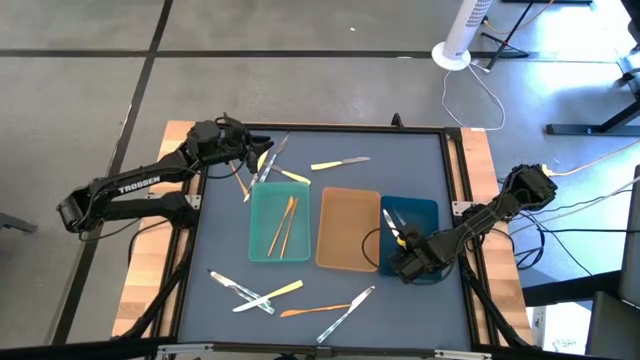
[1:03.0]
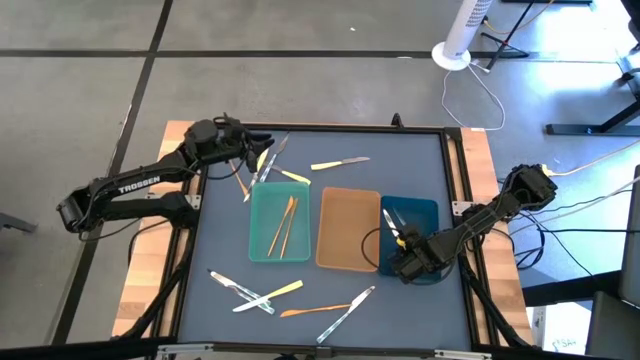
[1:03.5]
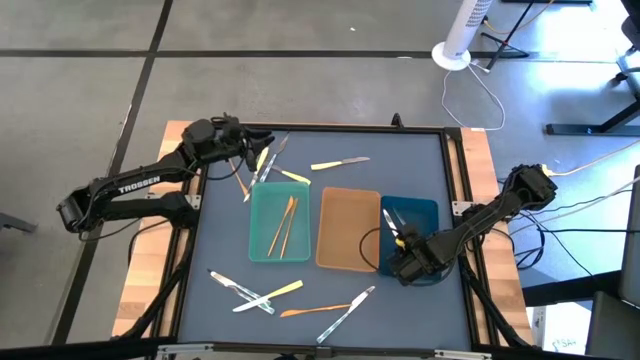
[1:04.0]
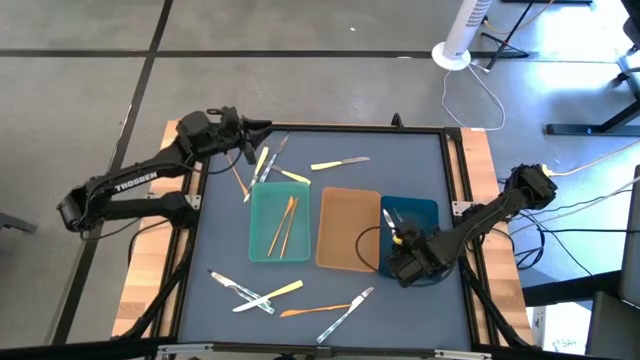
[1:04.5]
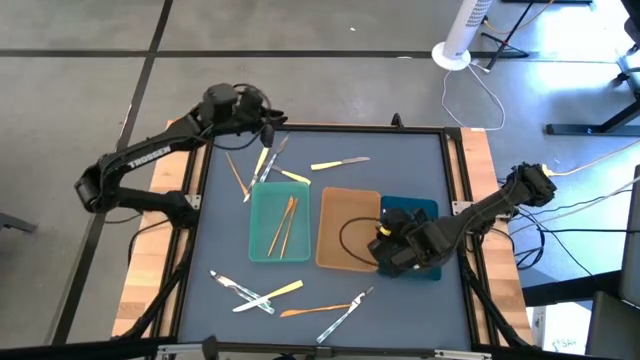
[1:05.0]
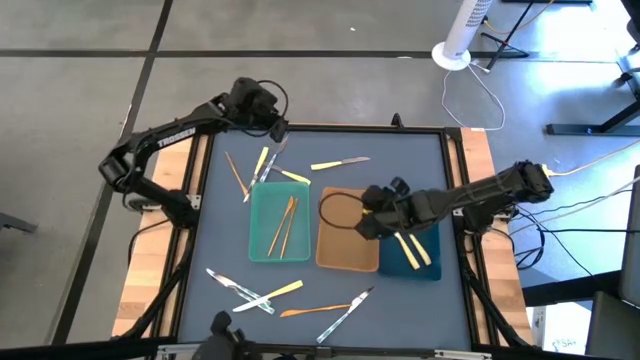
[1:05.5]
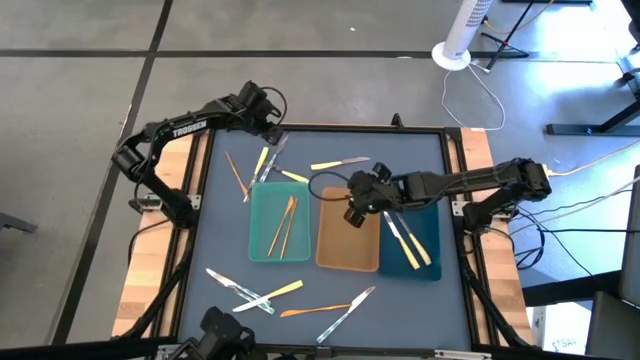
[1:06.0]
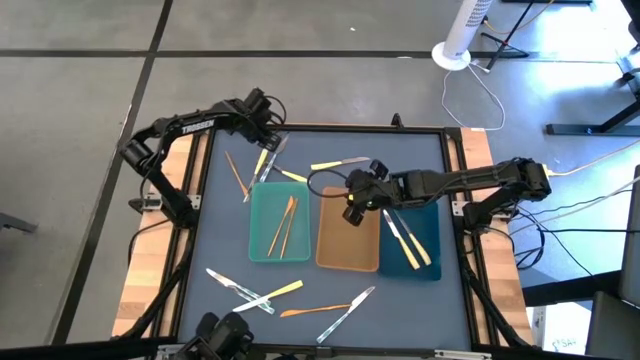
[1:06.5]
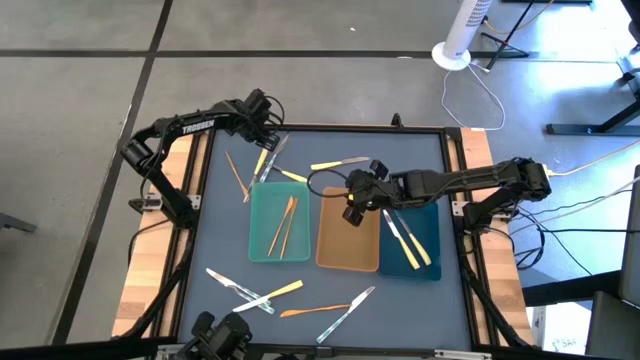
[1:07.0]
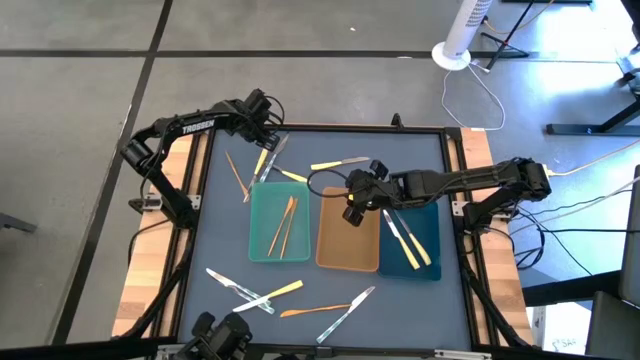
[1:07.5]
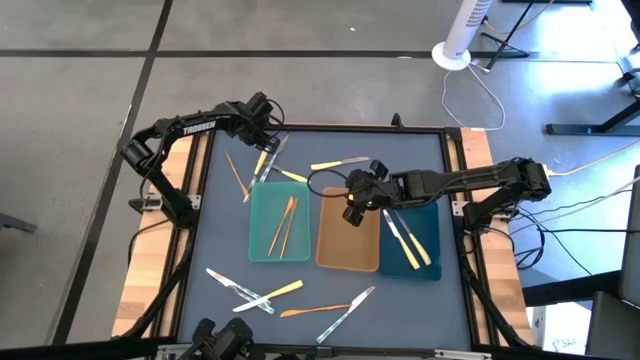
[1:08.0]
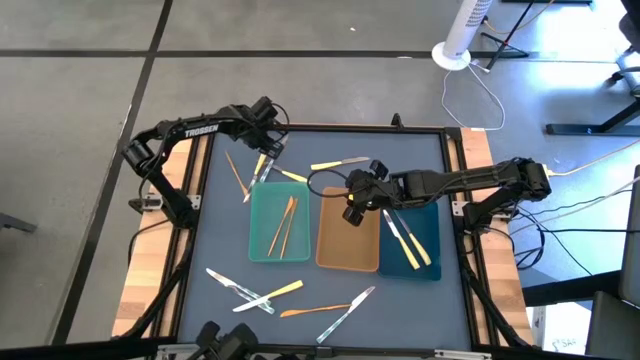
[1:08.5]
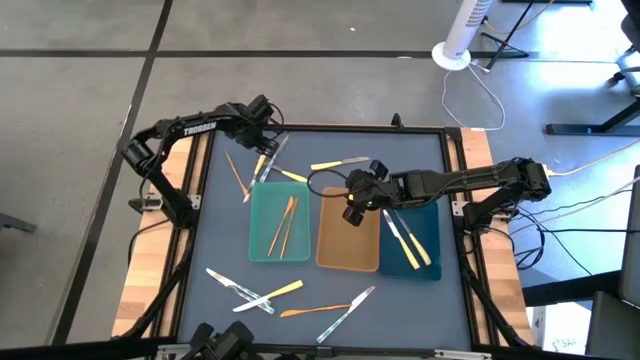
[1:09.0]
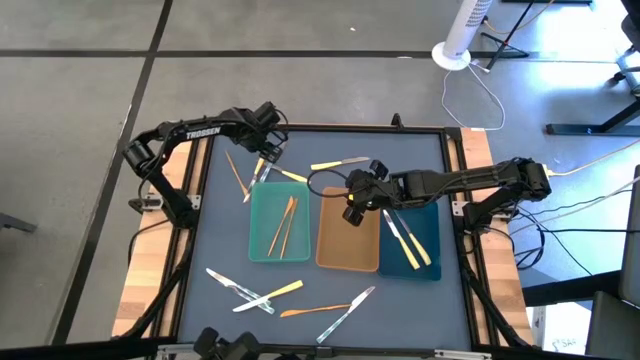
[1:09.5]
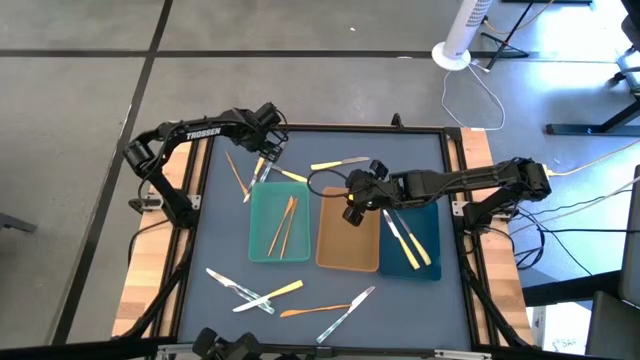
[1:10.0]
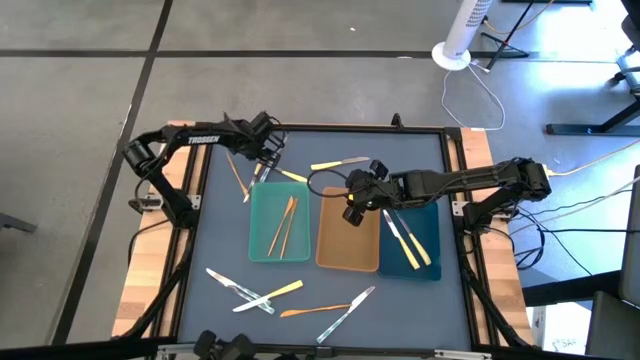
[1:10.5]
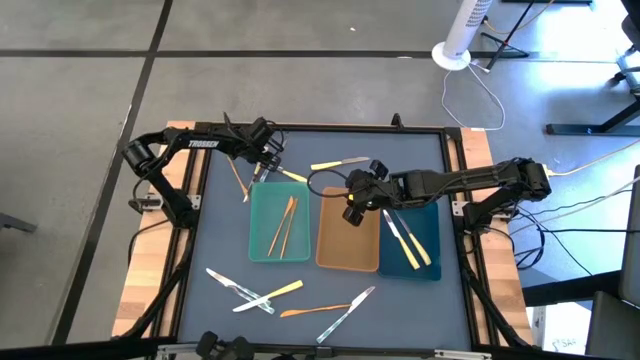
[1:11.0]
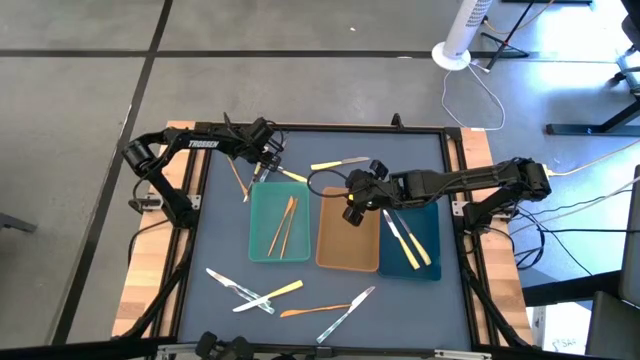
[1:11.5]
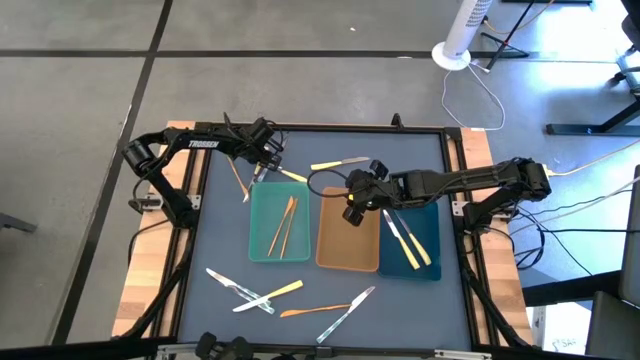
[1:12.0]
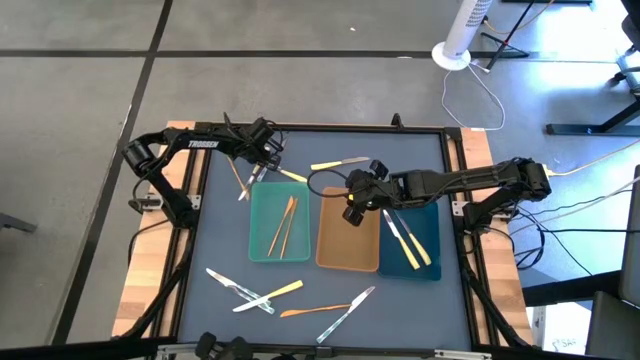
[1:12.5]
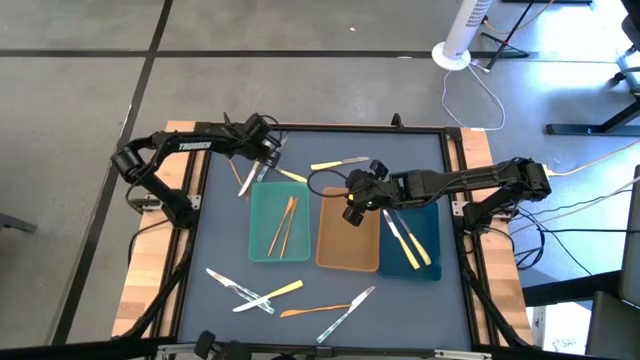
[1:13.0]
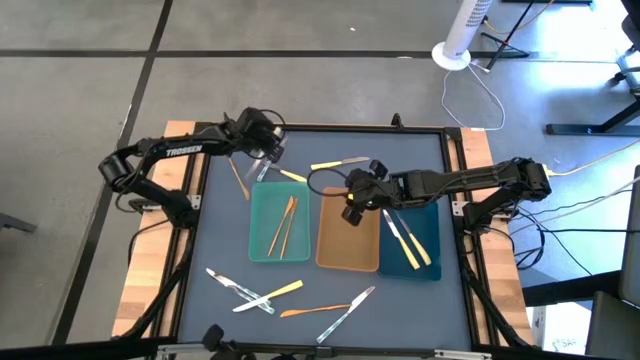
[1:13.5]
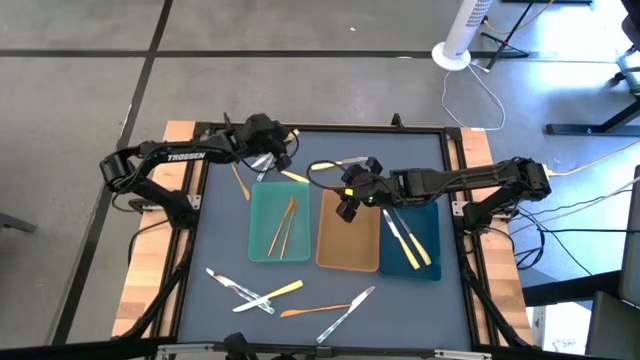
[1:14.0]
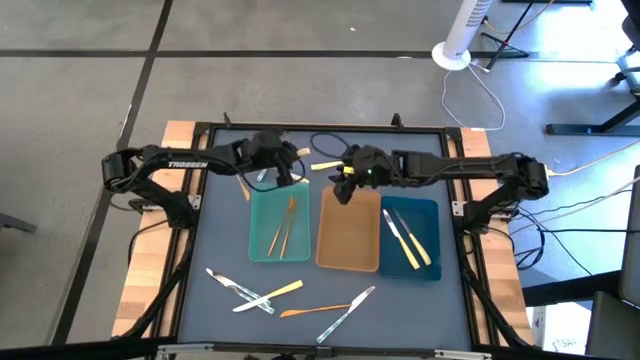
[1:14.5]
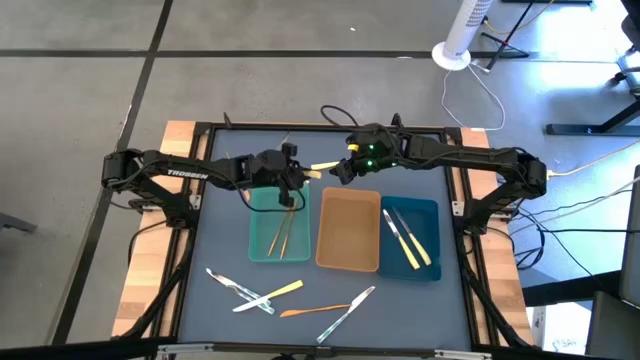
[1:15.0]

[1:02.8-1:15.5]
Task: Sort silverware by color (type)
Put the yellow knife into the blue bin

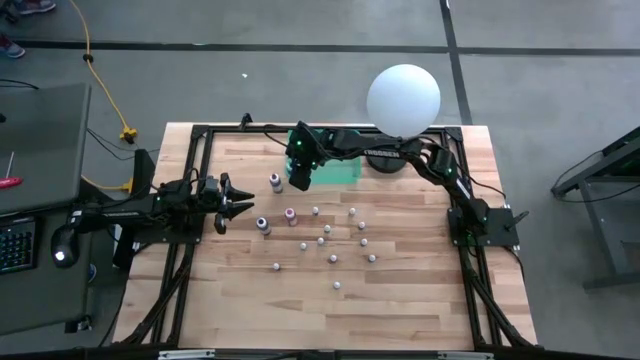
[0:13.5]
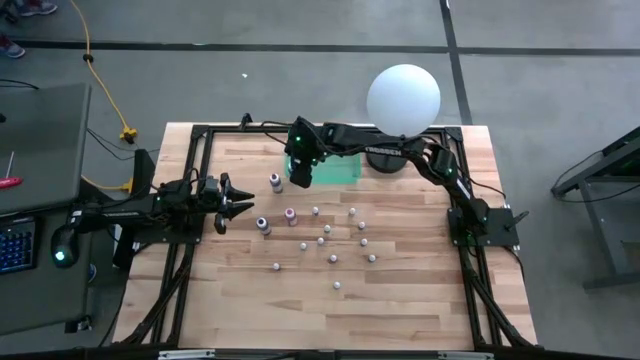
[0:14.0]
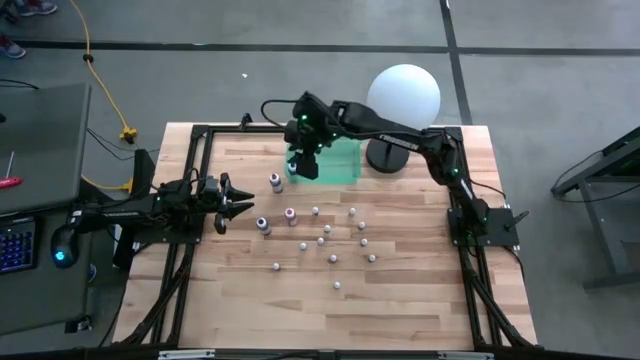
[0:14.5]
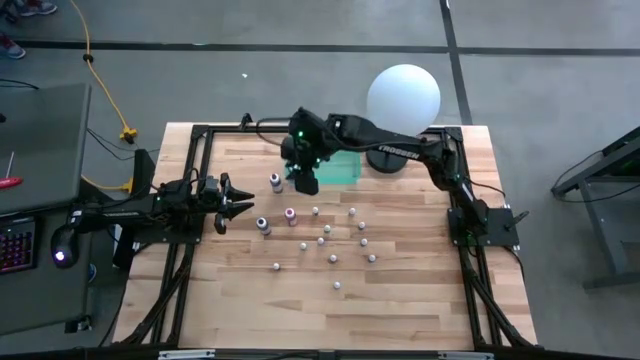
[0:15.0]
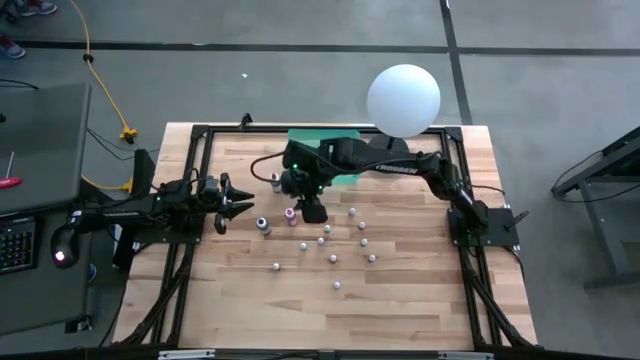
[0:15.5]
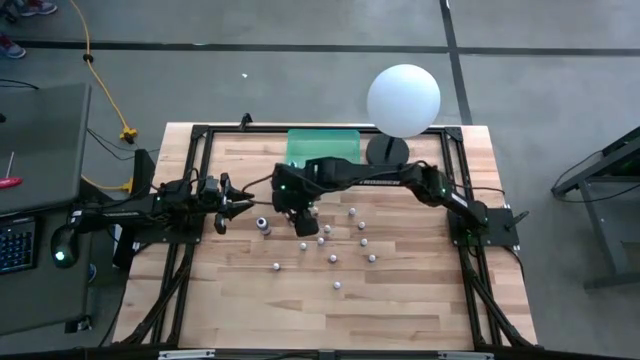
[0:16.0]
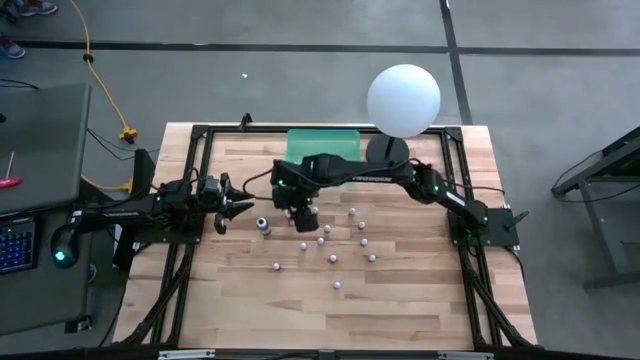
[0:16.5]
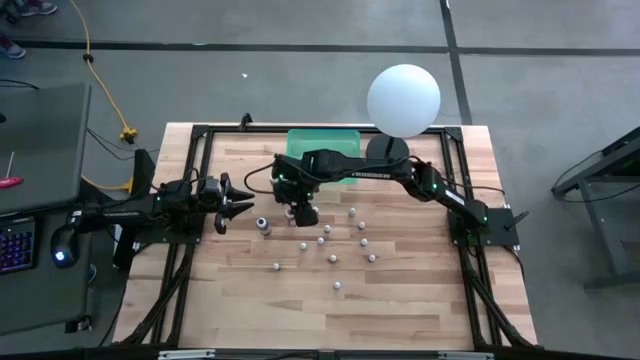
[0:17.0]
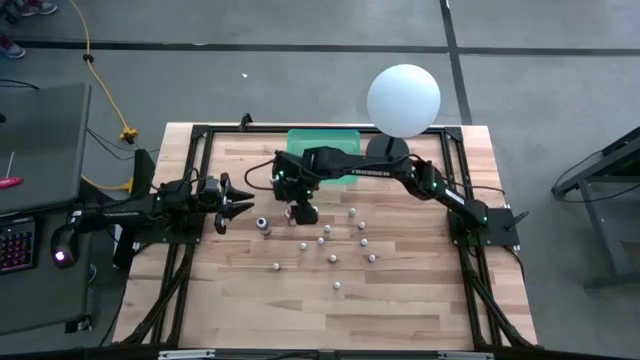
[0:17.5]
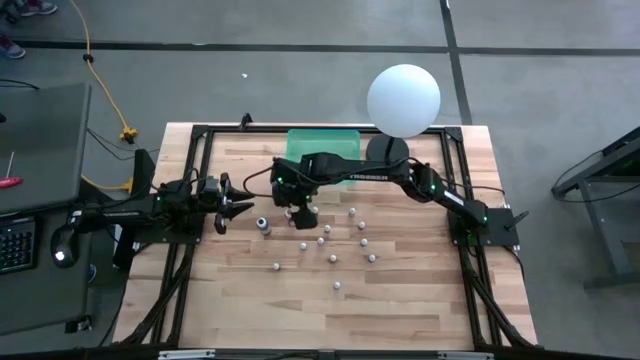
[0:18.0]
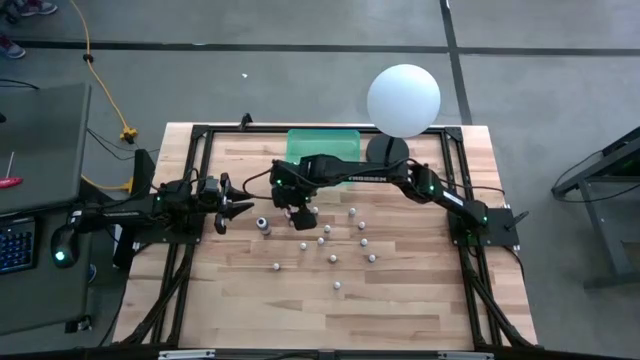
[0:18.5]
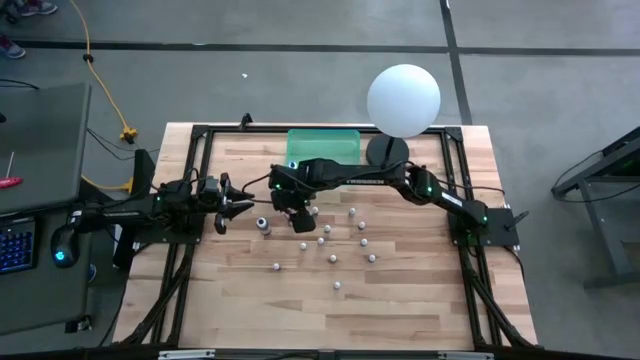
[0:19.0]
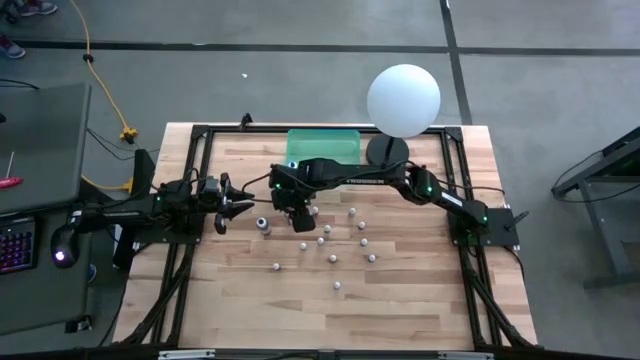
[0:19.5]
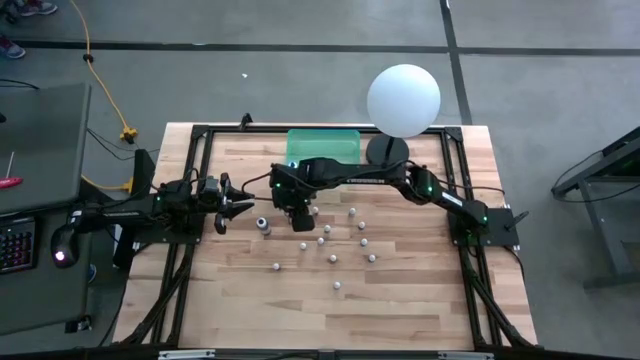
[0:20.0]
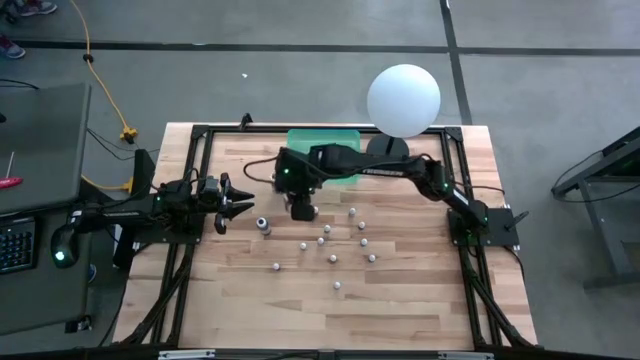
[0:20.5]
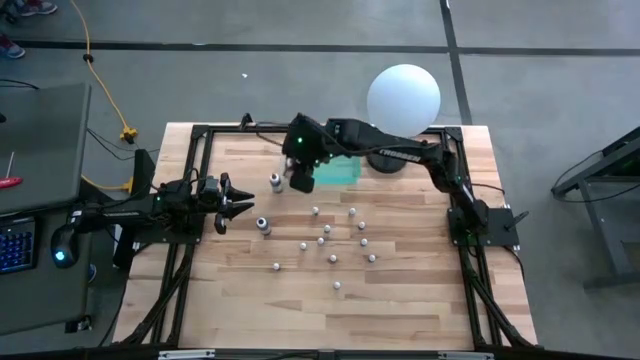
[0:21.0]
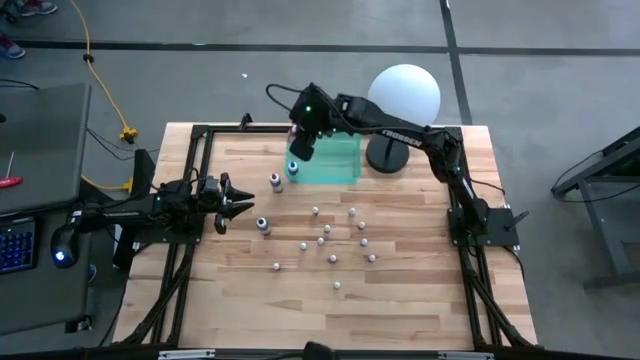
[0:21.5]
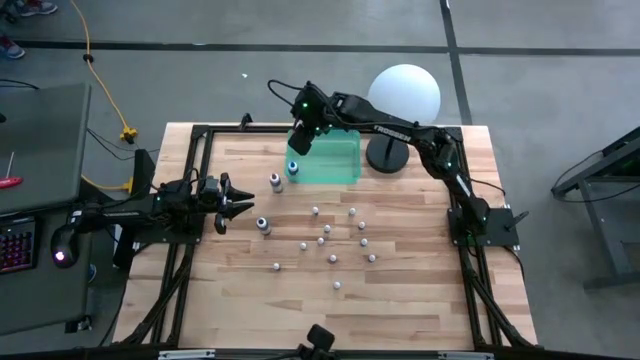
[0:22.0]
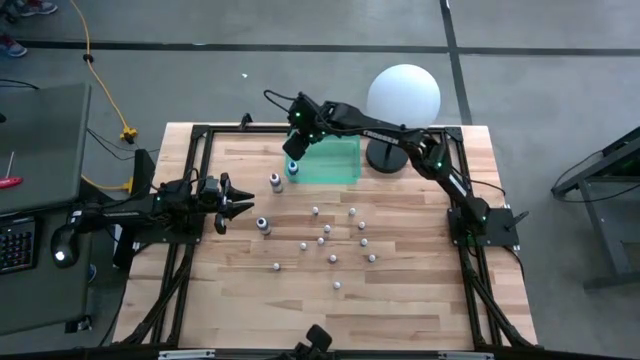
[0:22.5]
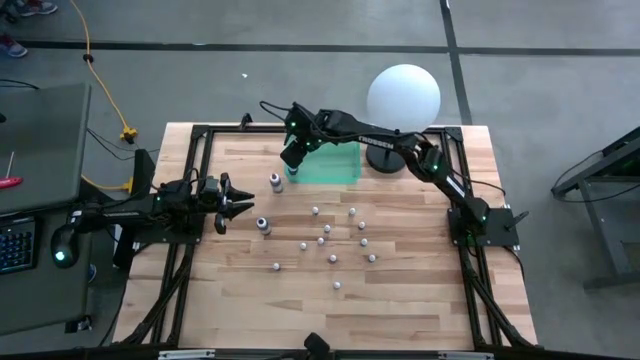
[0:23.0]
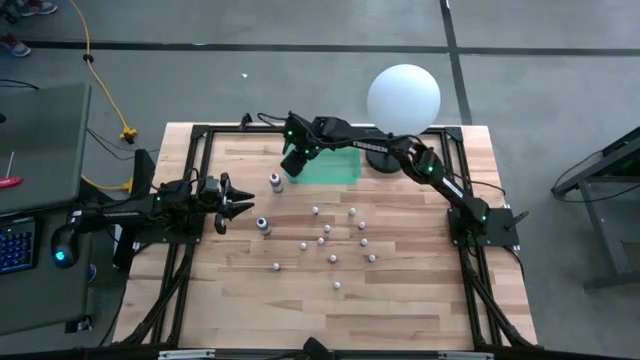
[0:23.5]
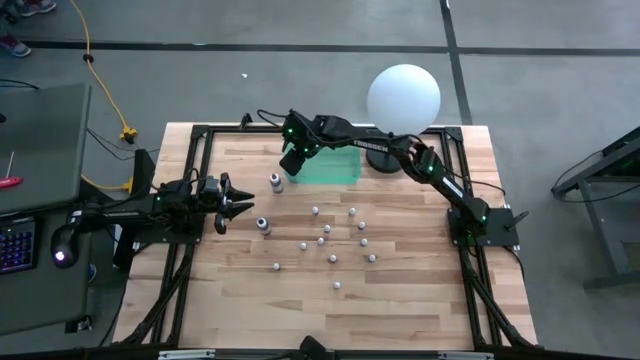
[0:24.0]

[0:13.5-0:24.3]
Task: Pick & Place food coloring
Put the large red food coloring bottle into the green bin
